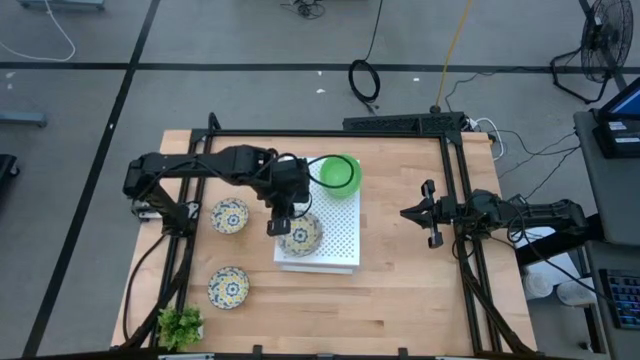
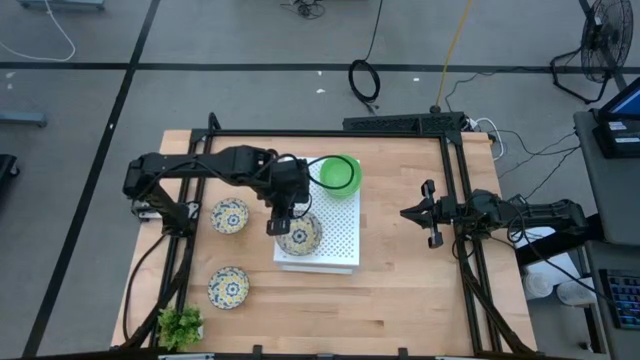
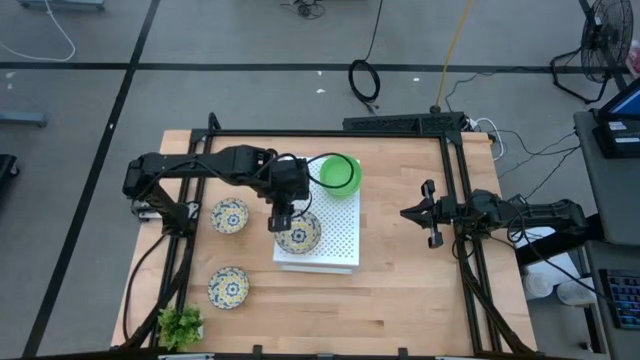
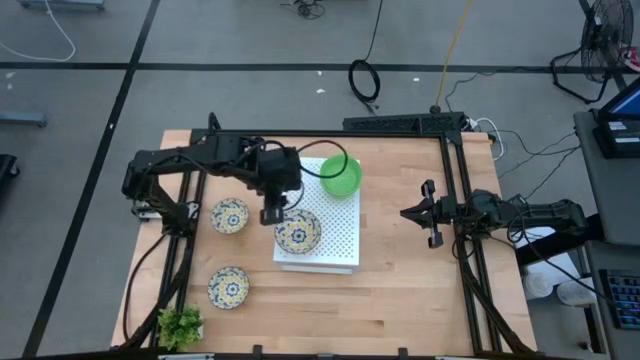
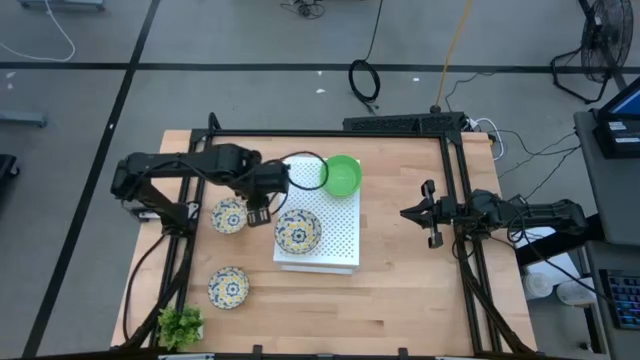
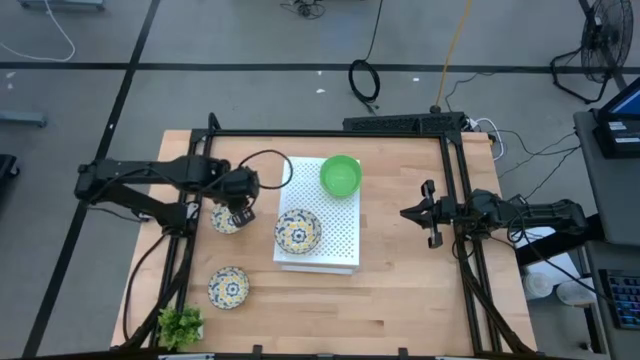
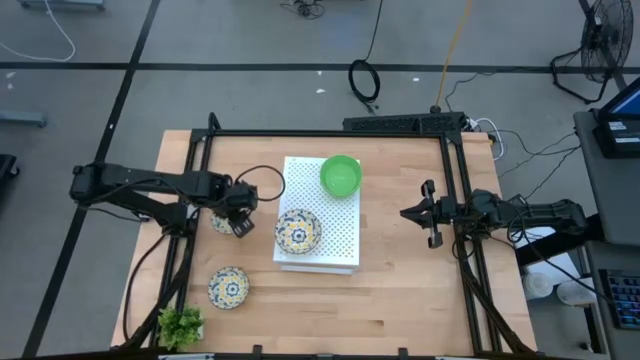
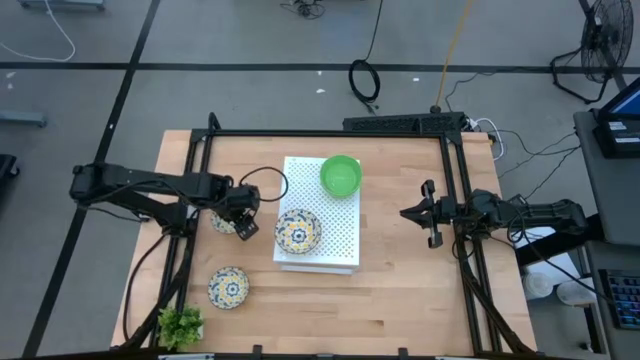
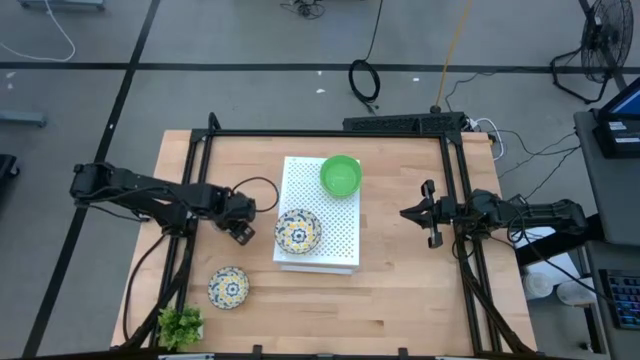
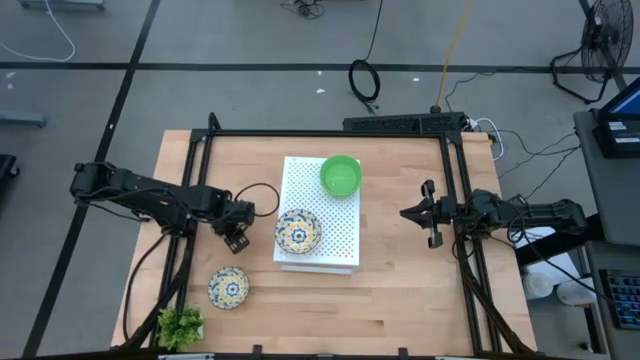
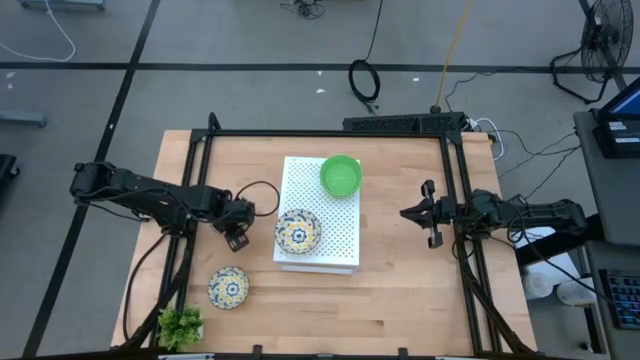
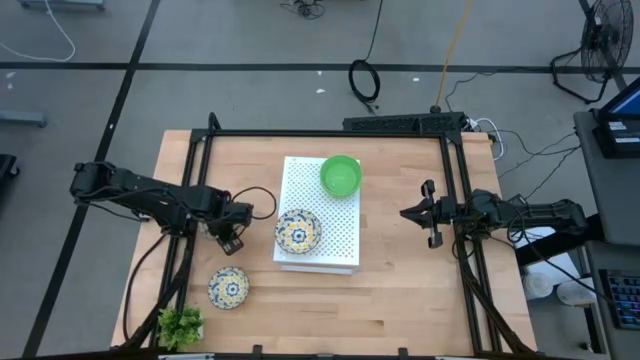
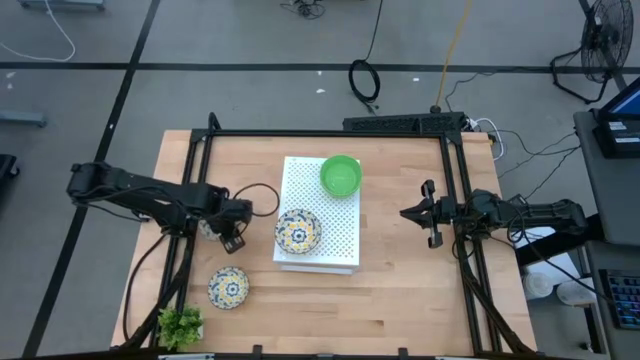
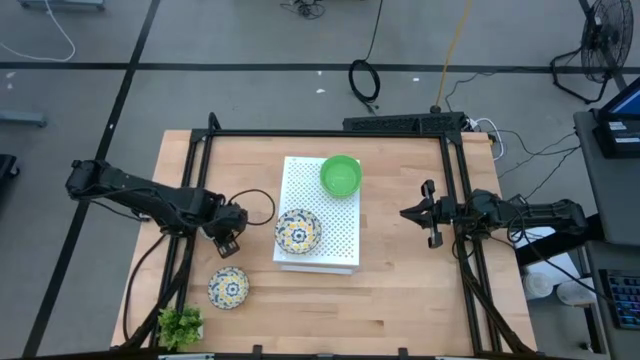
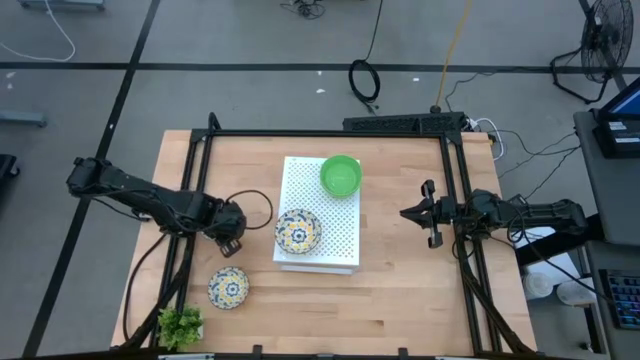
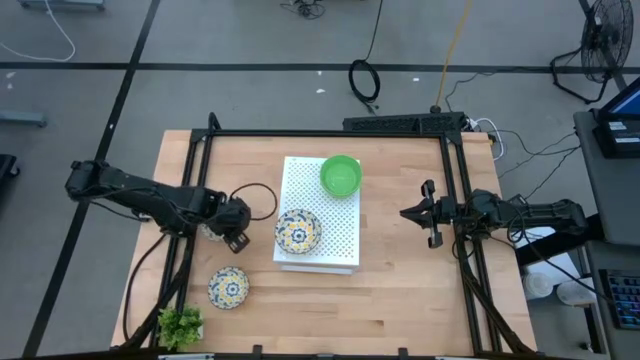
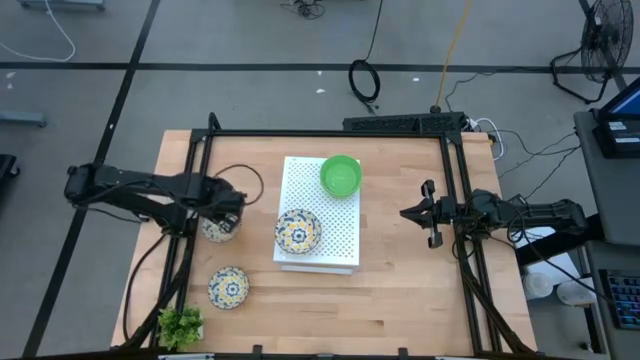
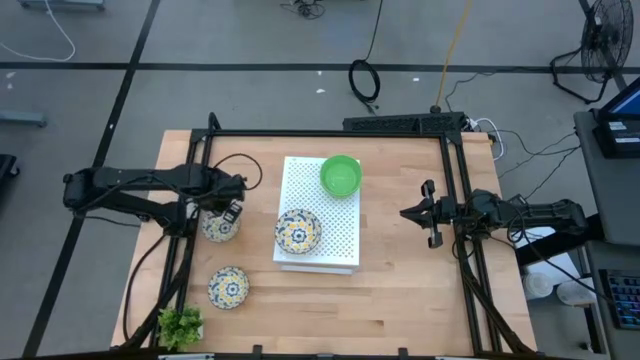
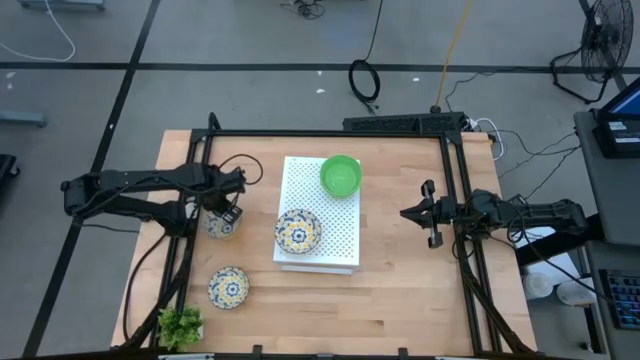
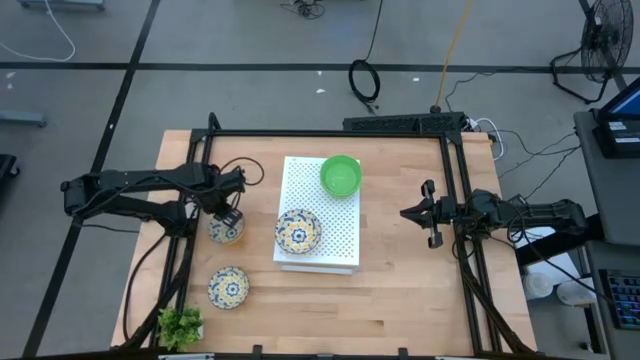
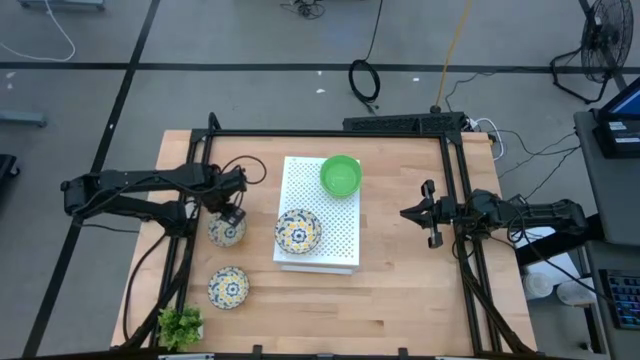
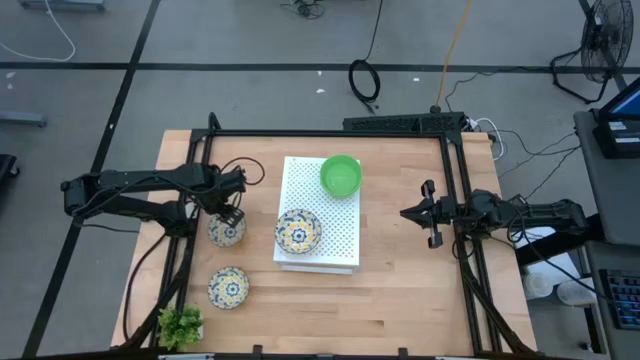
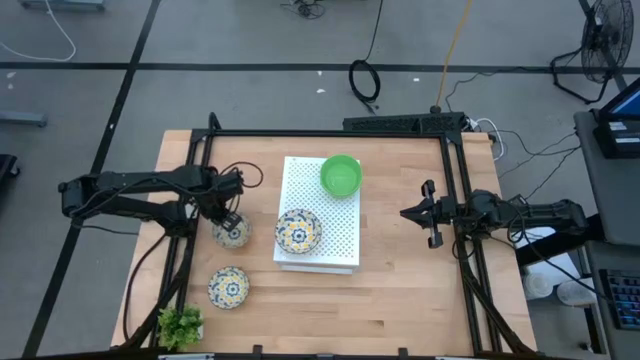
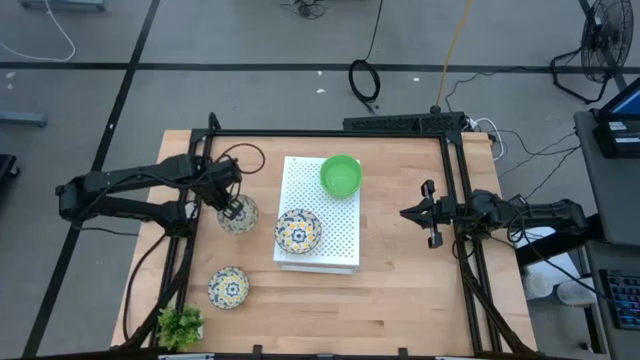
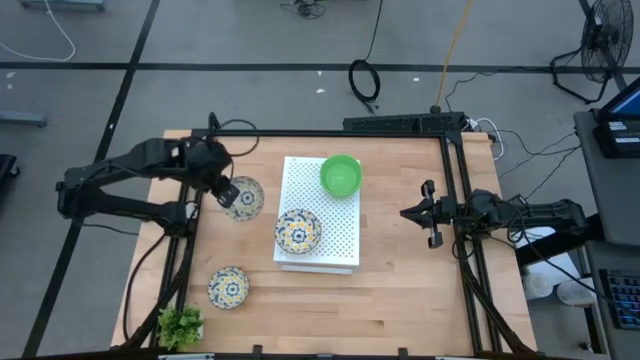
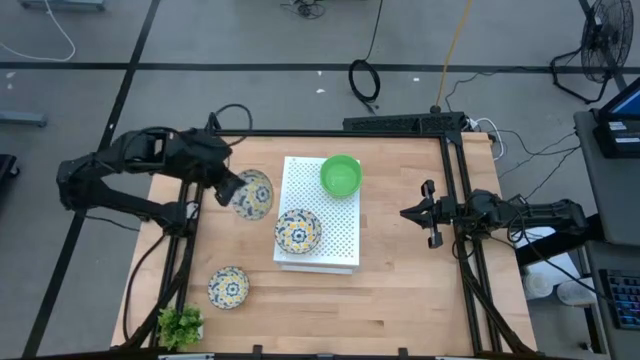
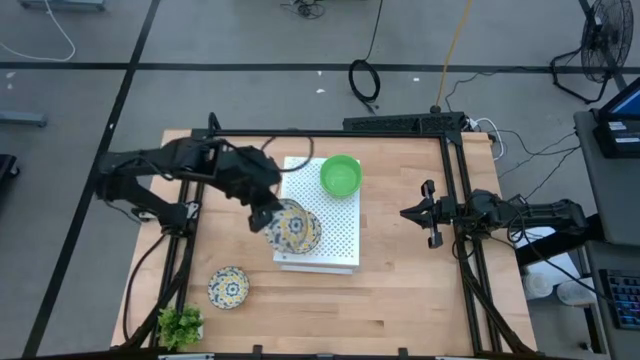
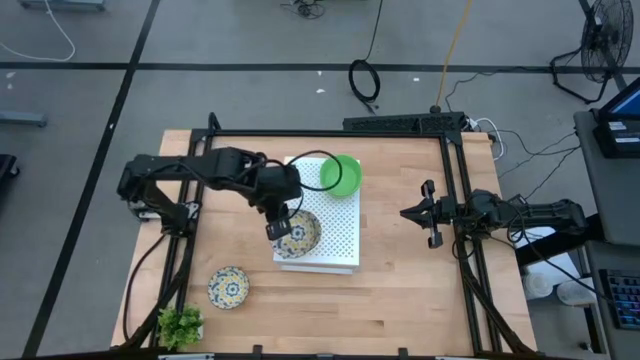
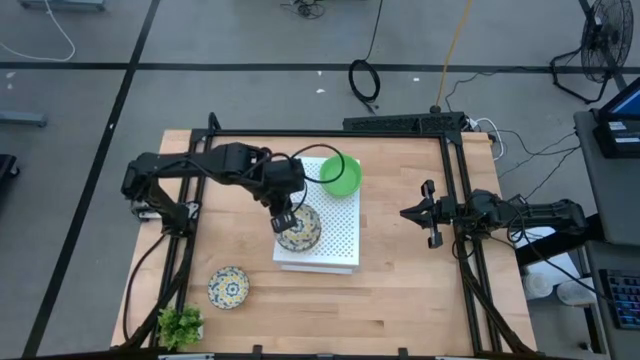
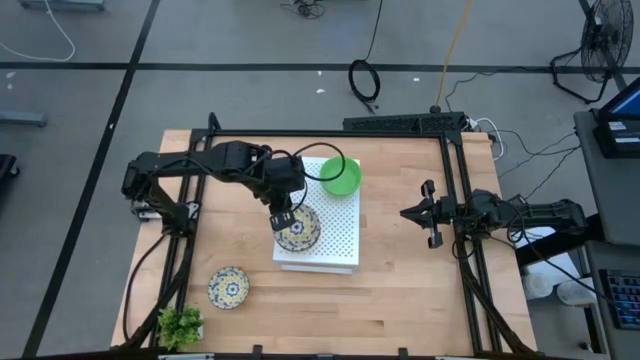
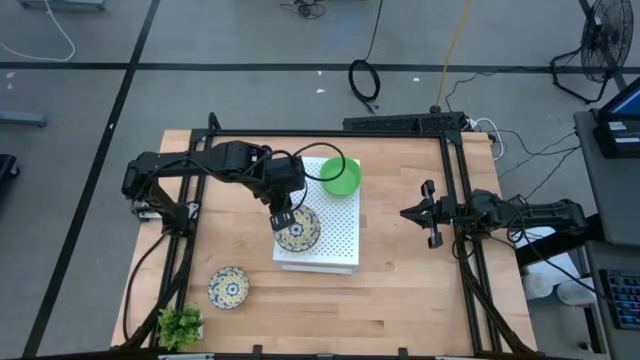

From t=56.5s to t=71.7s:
Task: Pick & Place Mini bowls
Stack the top yellow patterned bowl on the yellow patterned bowl on the shelf

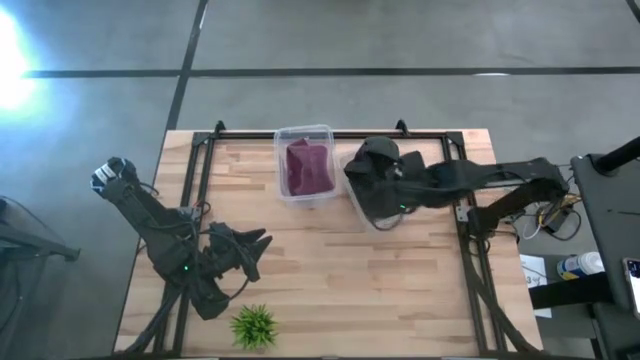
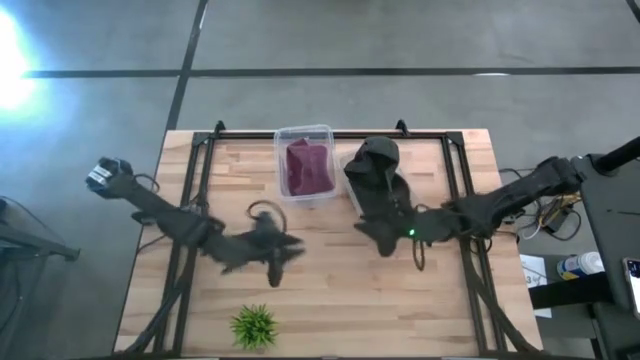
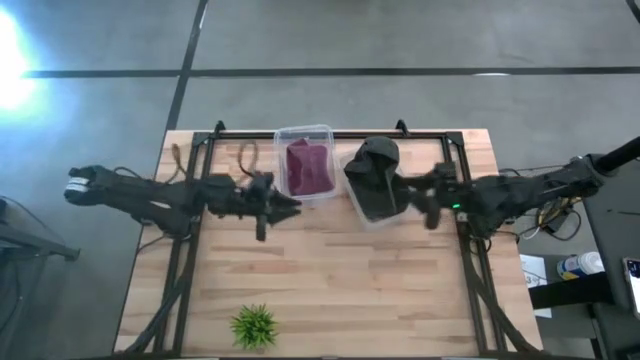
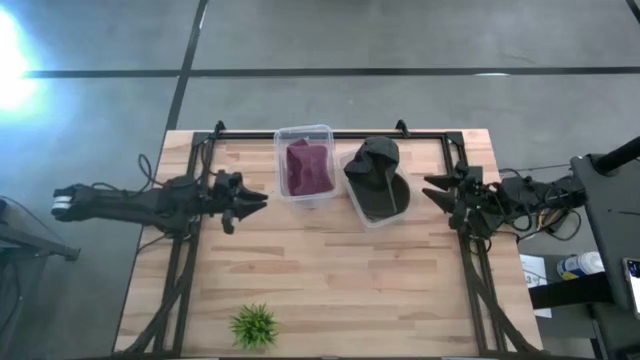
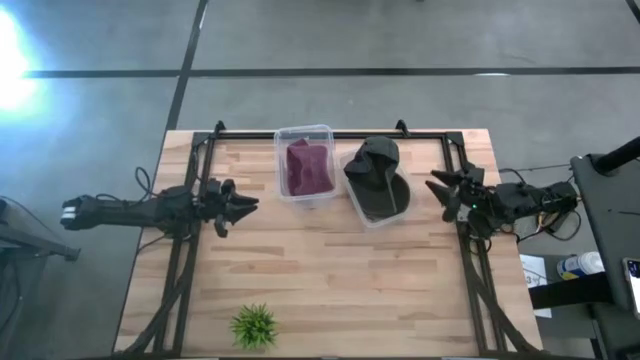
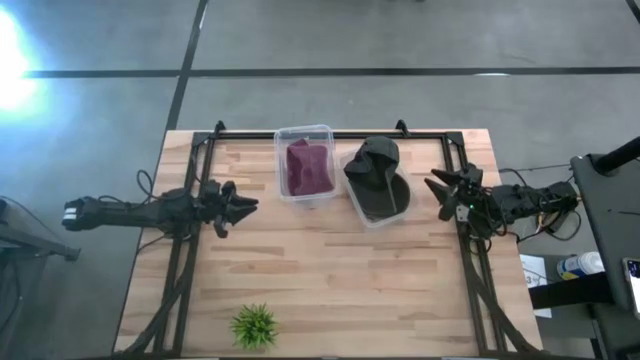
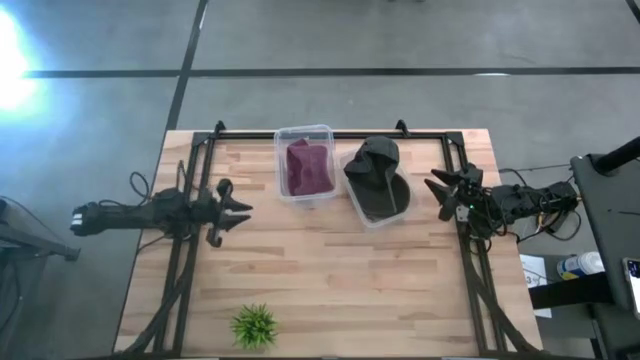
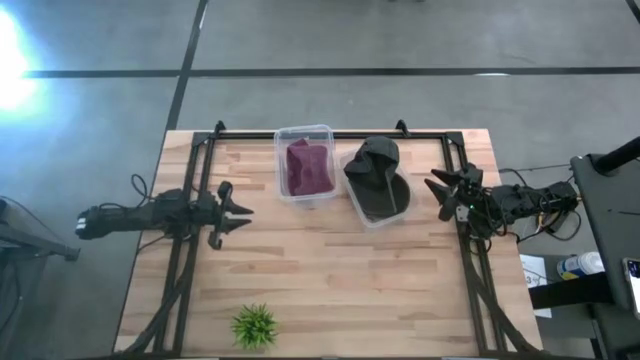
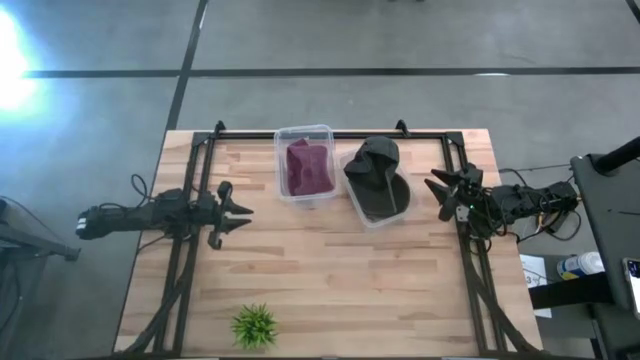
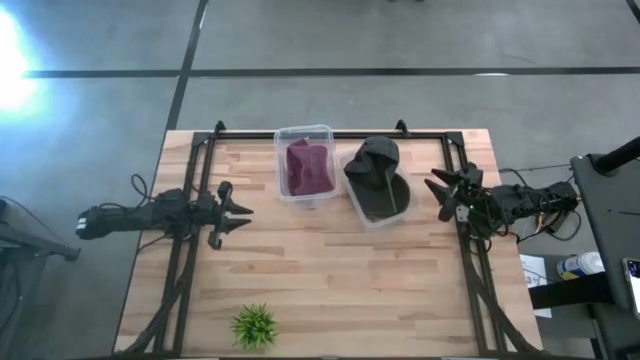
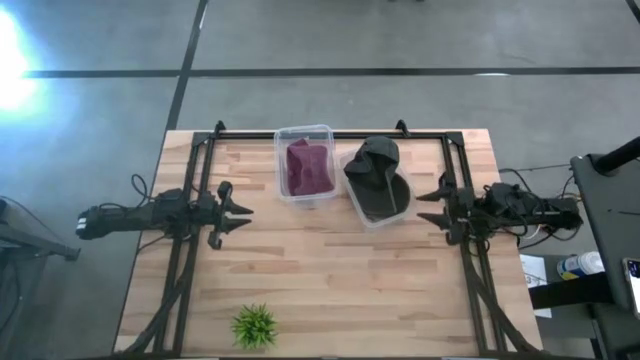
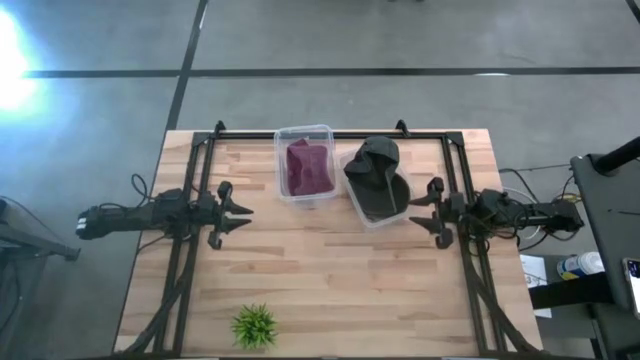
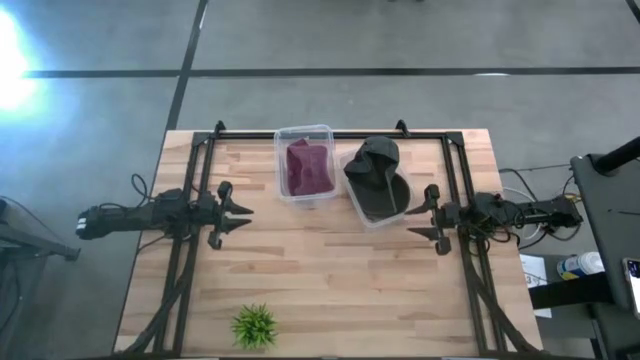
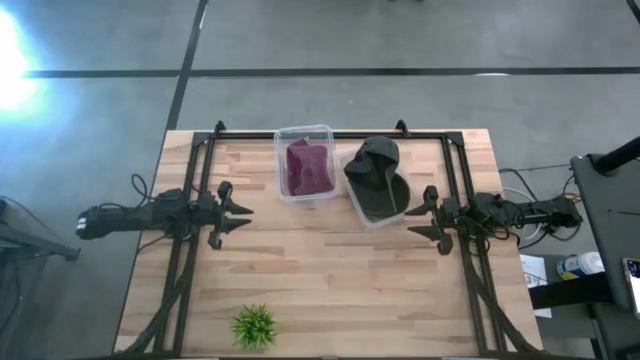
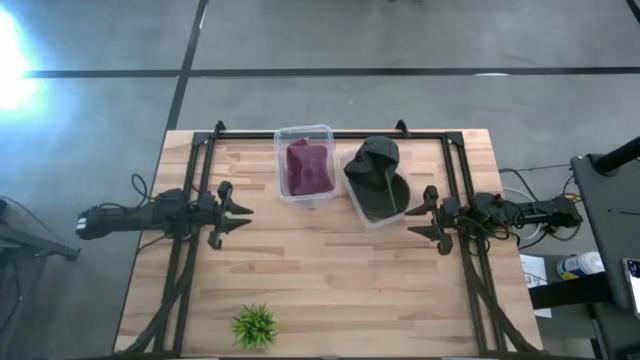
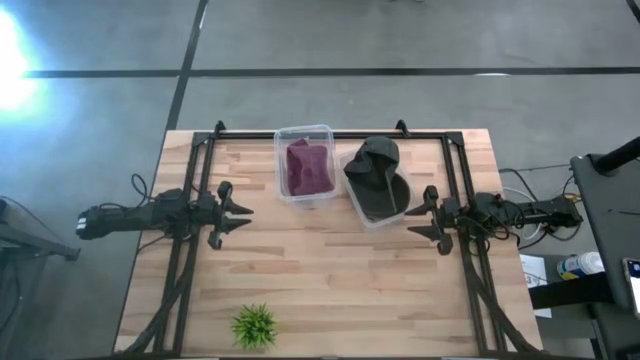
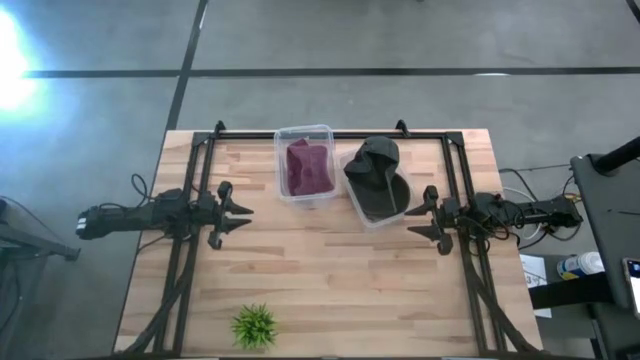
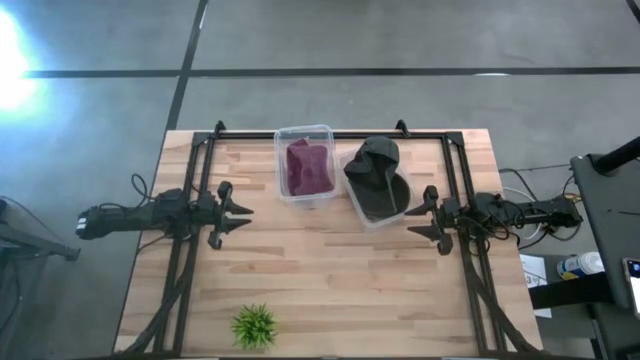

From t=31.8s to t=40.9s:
Task: Pick and place caps into container
Return to Home Position
